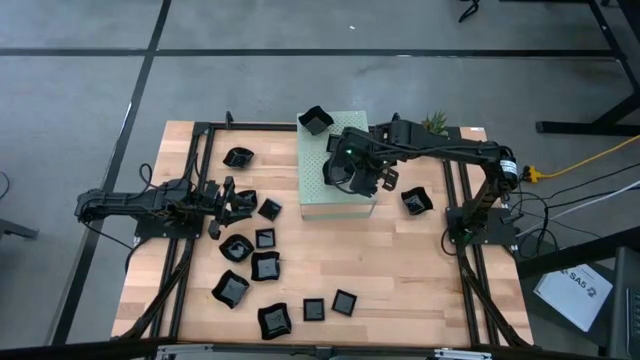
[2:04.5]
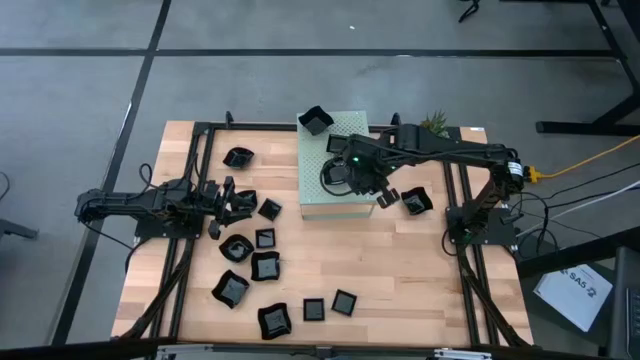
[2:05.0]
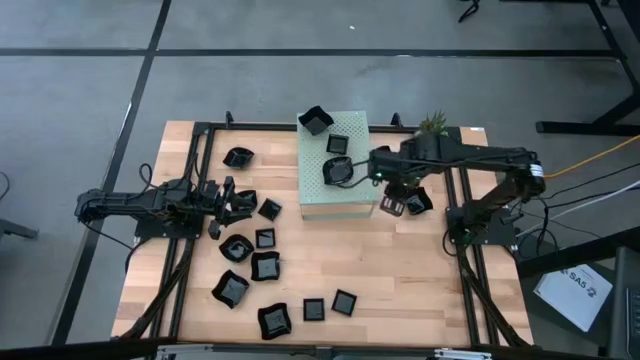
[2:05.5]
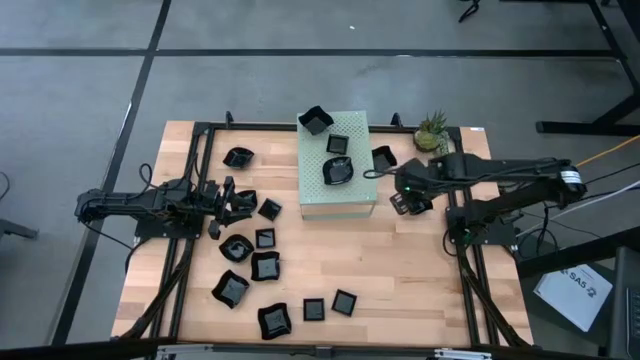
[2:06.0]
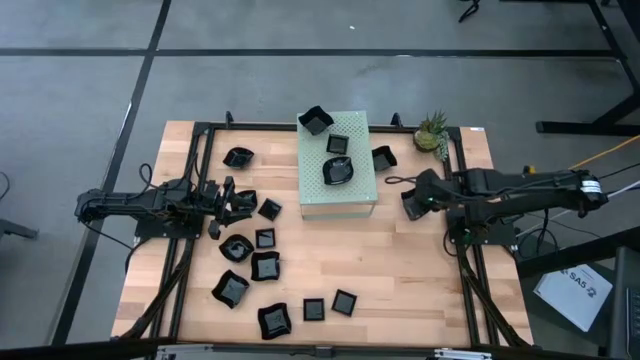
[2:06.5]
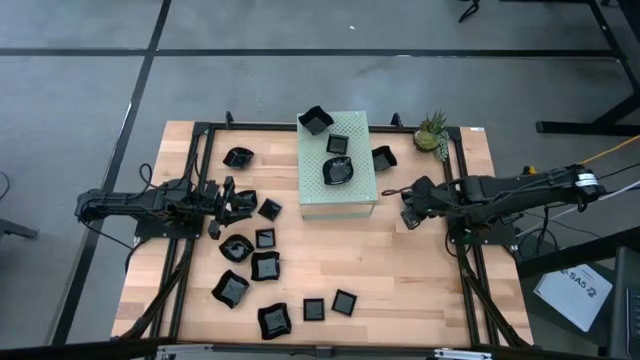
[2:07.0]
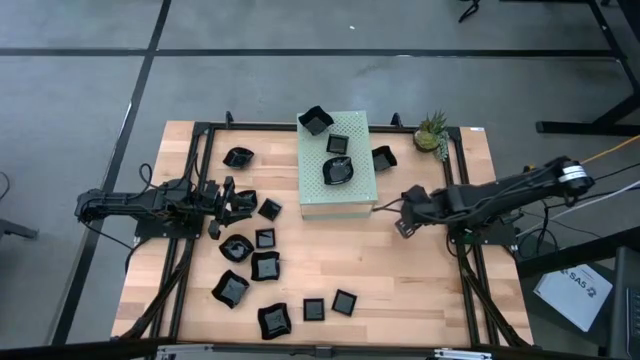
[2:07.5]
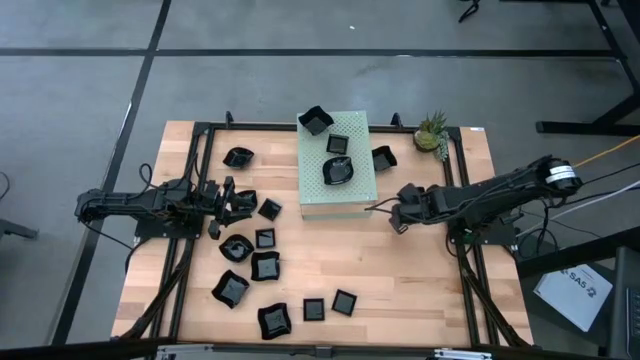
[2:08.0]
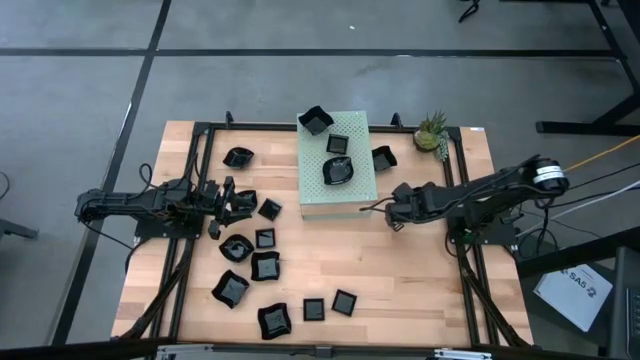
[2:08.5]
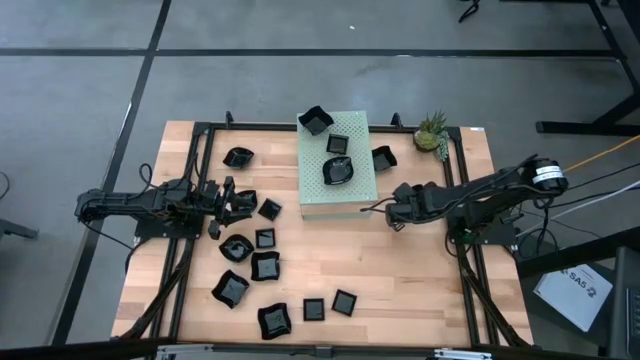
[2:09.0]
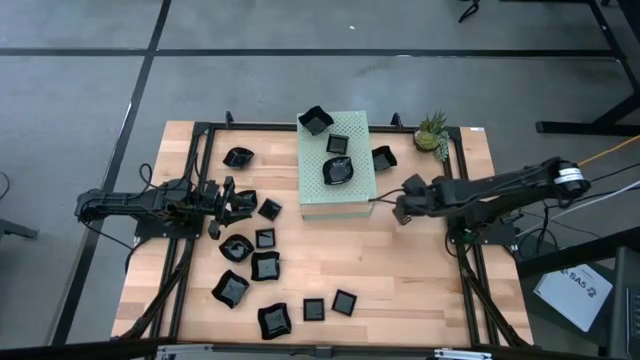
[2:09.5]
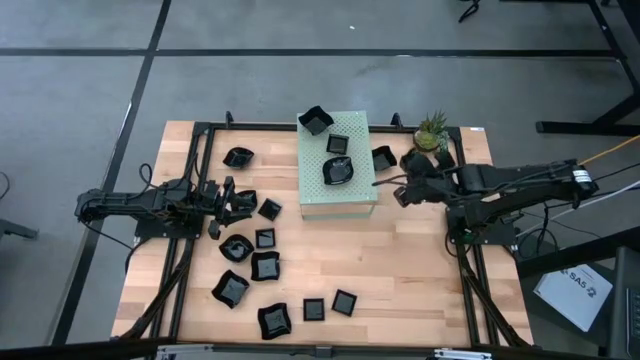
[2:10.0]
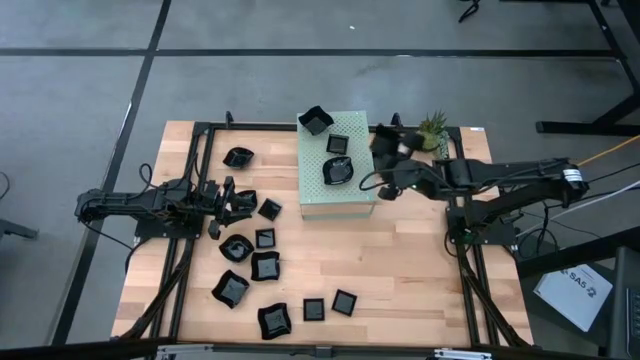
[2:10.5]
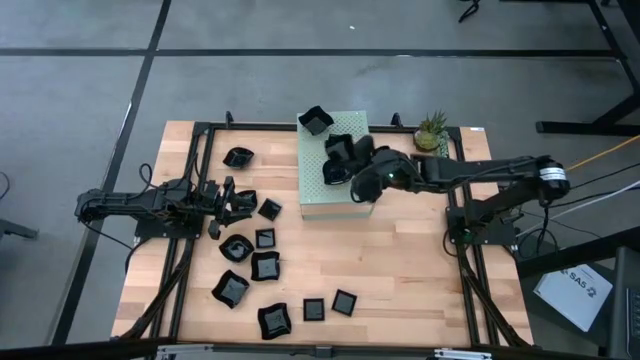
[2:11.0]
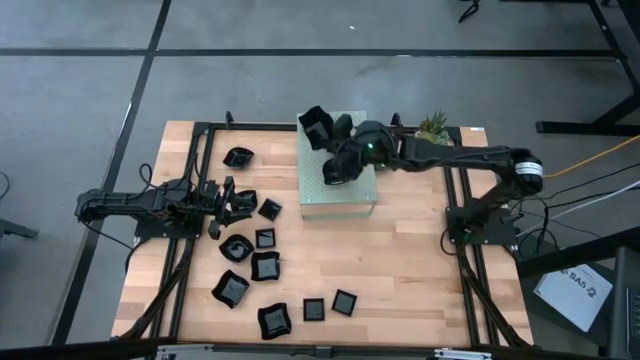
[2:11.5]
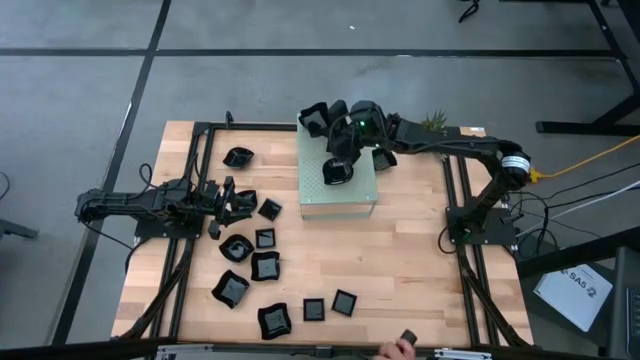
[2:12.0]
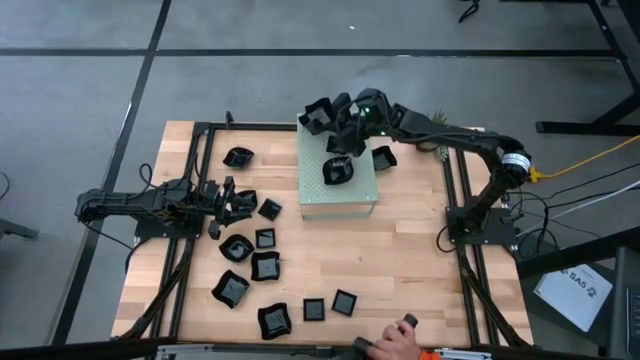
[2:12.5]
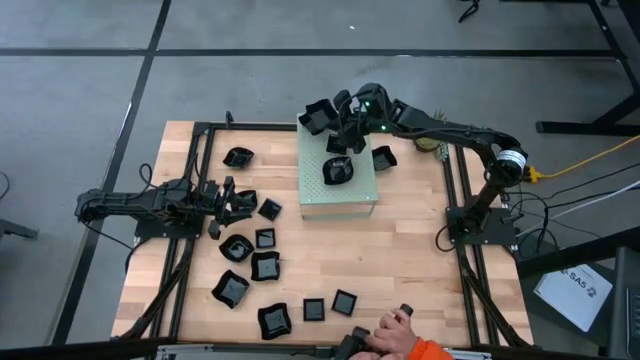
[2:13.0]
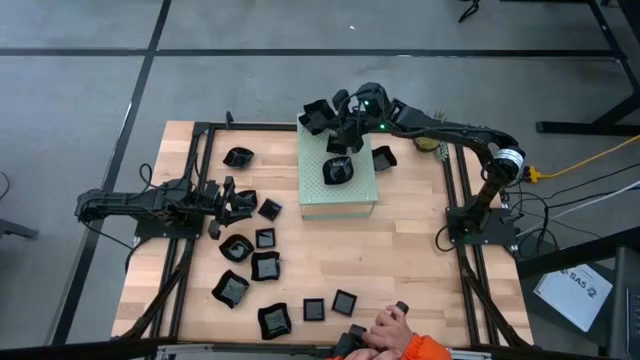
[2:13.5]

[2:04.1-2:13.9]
Task: Pick & Place Mini shaped plates
Stack the black distorted square plate on top of the black distorted square plates on the shelf

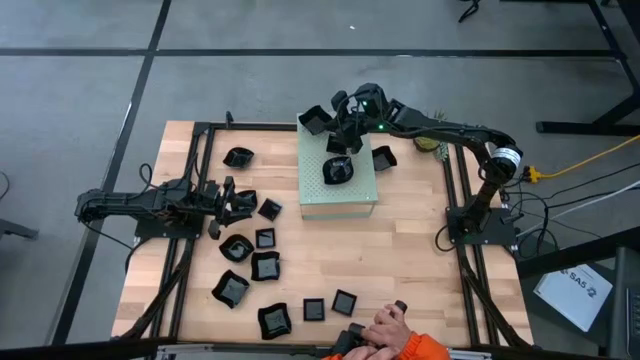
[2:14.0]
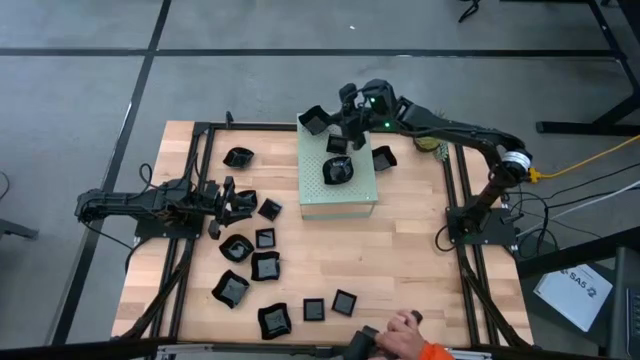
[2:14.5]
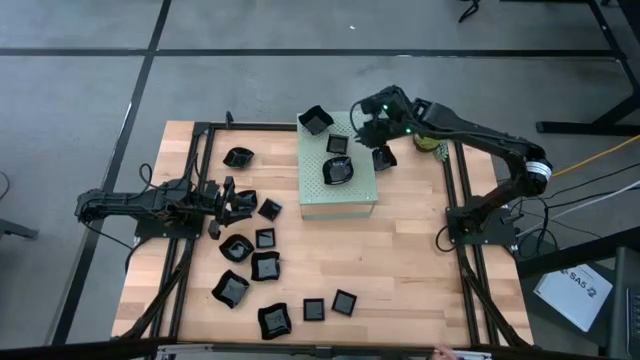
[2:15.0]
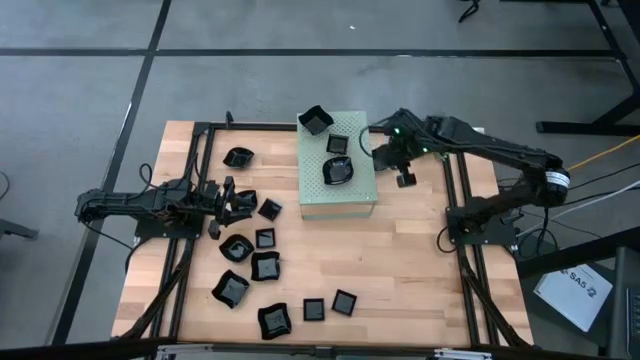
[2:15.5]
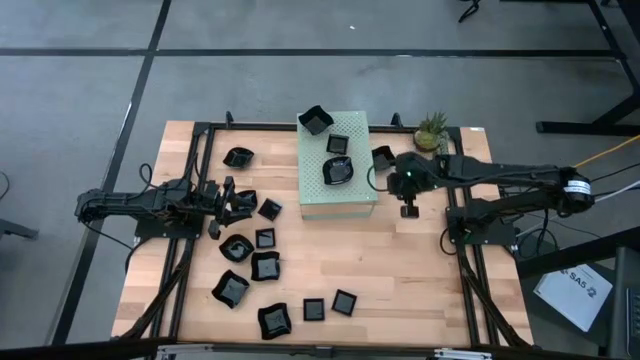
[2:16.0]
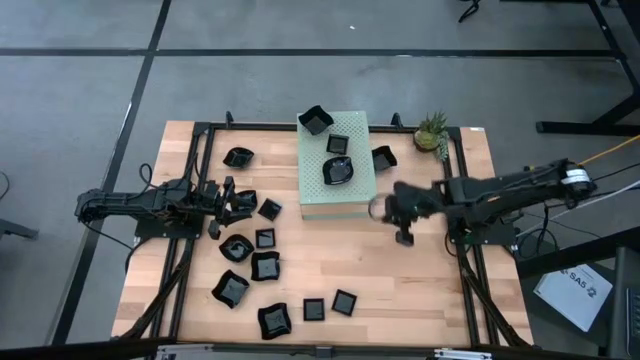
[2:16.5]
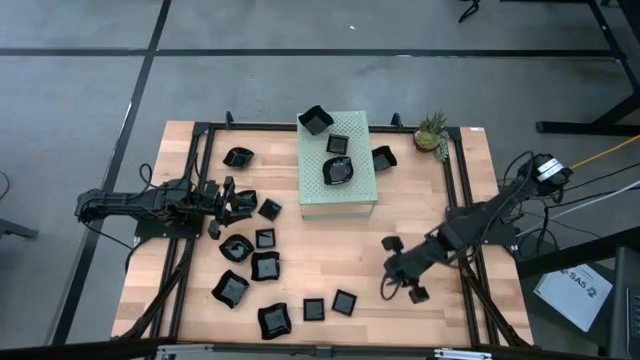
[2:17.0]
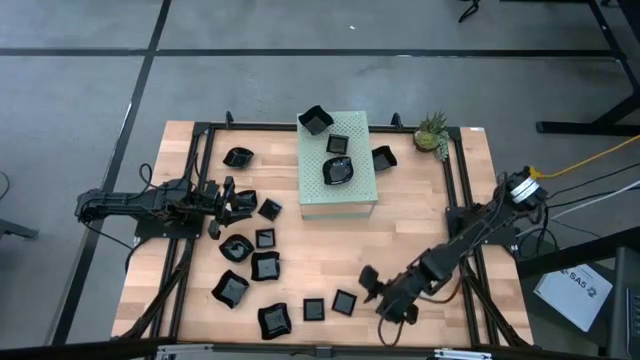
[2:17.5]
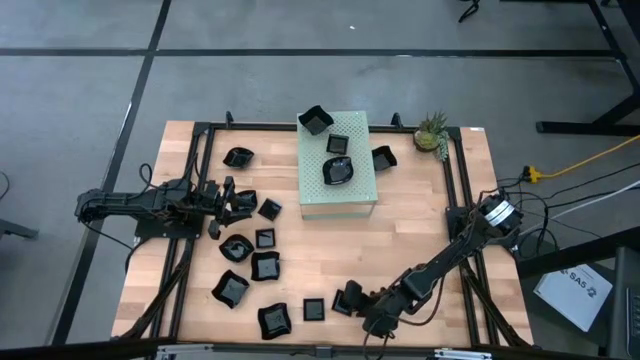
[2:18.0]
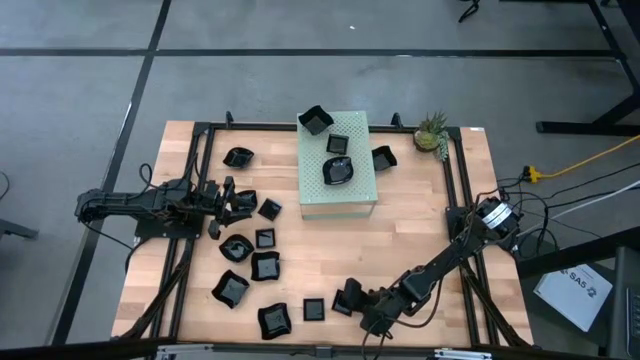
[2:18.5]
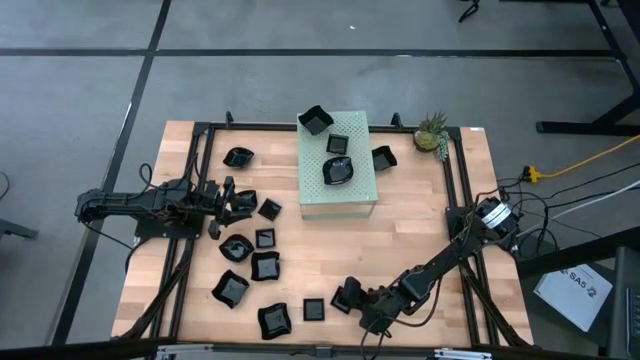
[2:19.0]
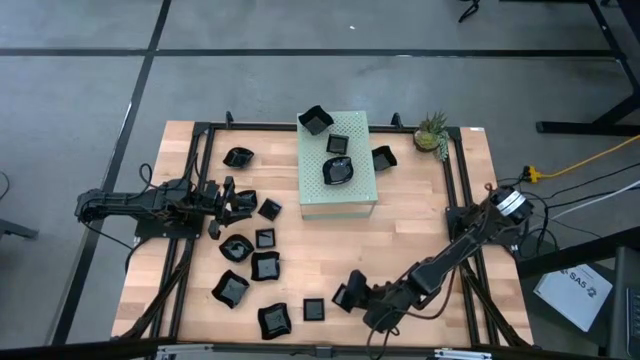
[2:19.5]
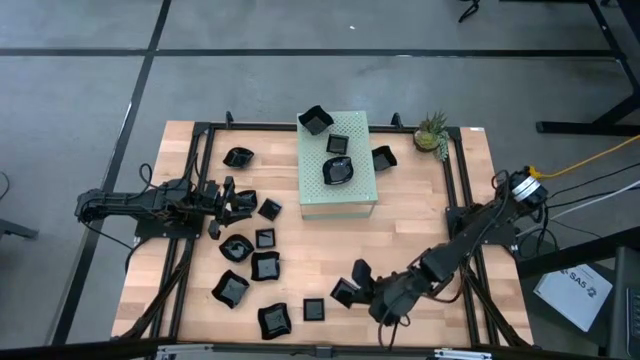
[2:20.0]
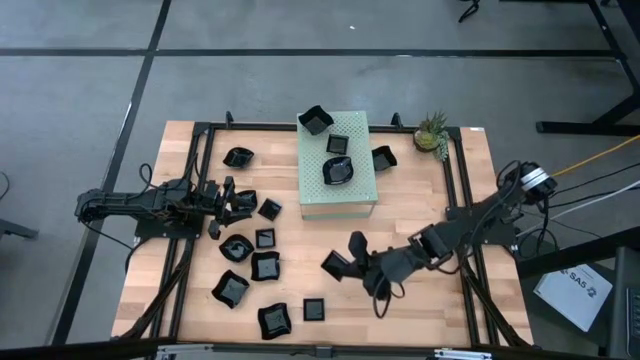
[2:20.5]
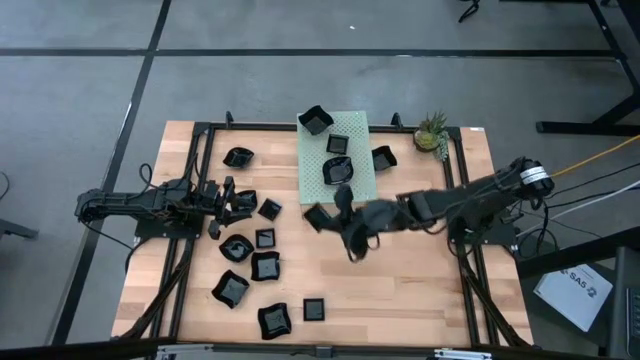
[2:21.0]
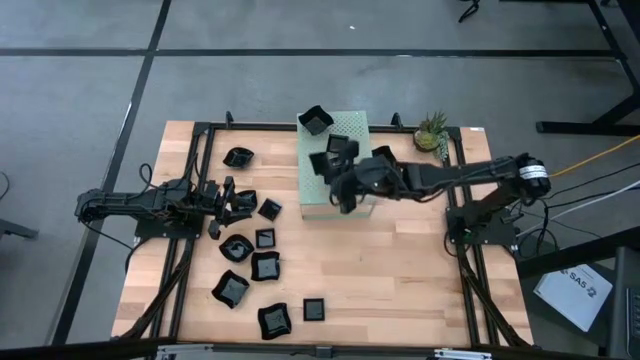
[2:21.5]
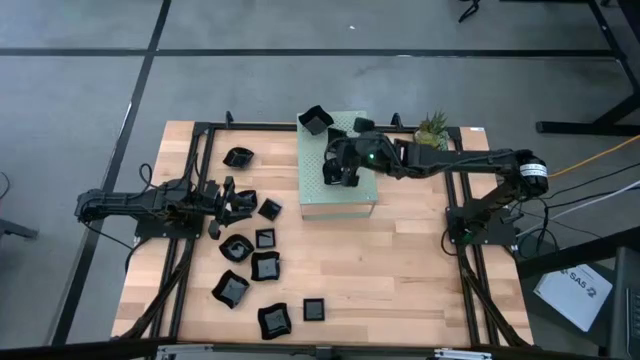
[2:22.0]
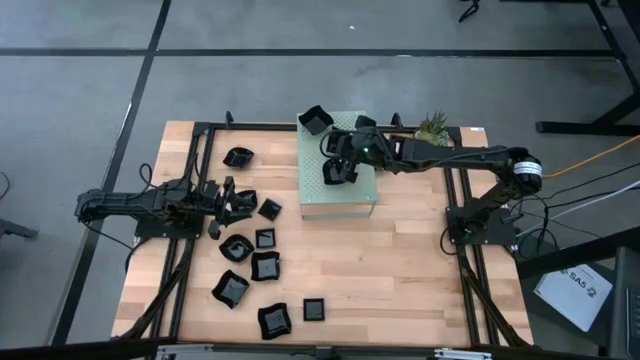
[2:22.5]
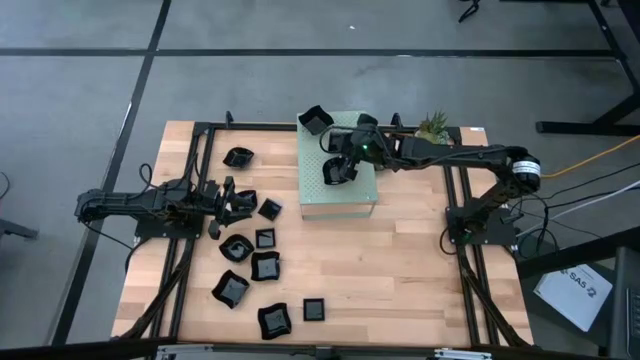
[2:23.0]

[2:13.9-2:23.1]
Stack the black square plate on top of the black square plates on the shelf
